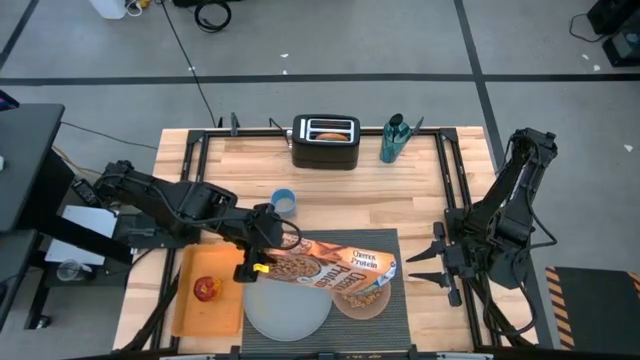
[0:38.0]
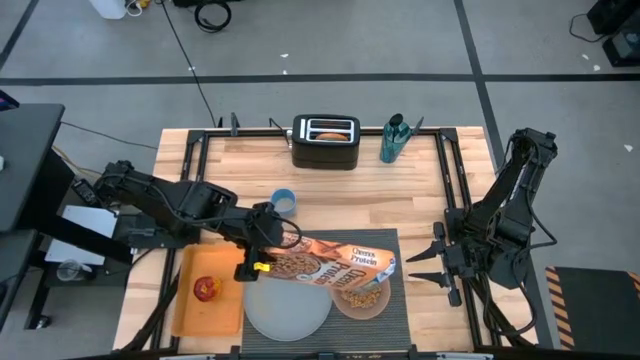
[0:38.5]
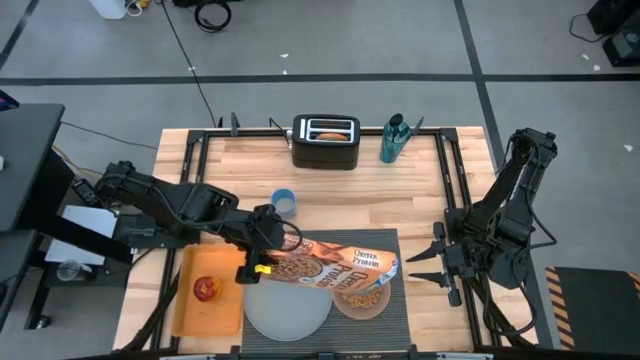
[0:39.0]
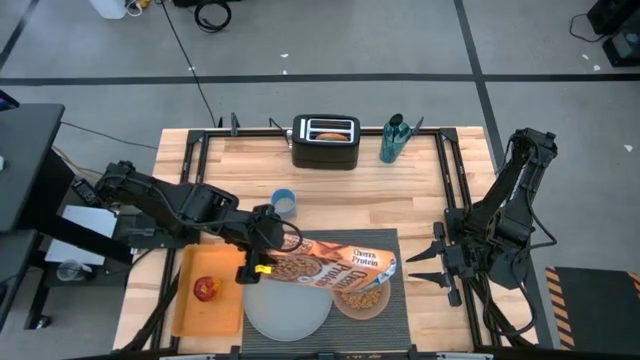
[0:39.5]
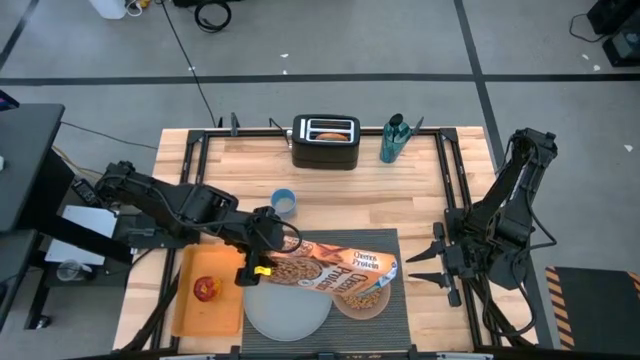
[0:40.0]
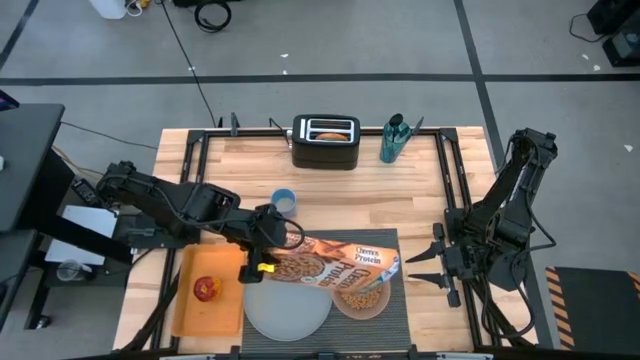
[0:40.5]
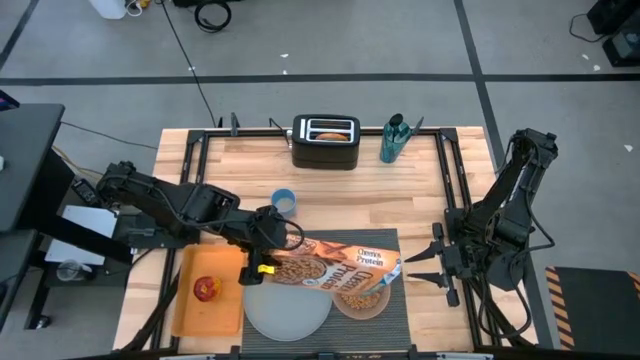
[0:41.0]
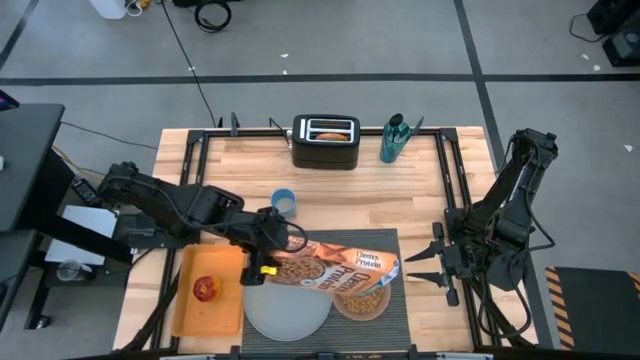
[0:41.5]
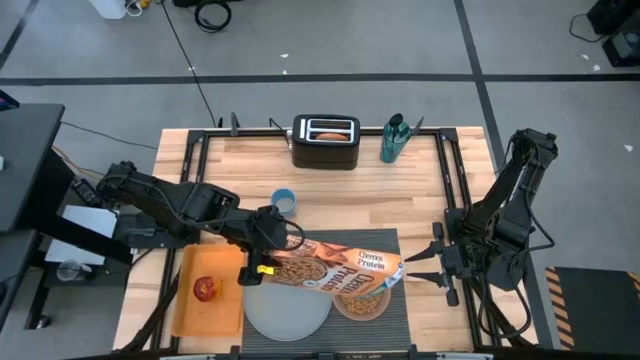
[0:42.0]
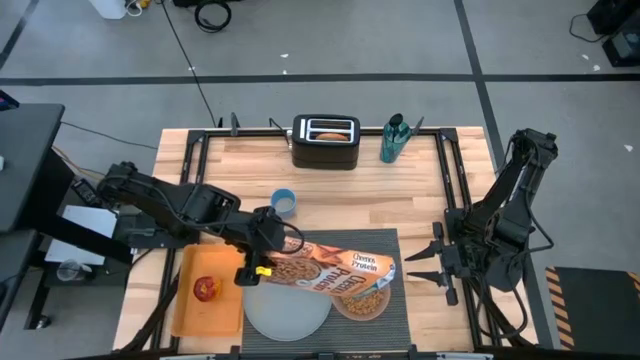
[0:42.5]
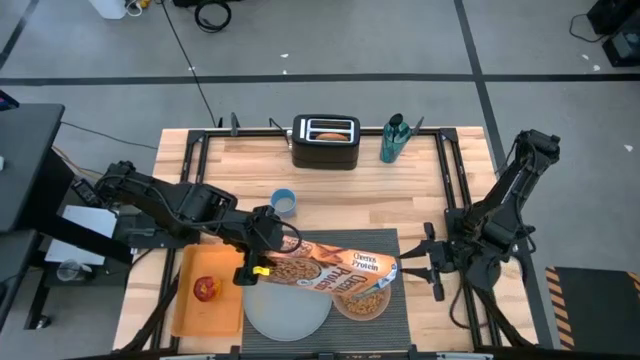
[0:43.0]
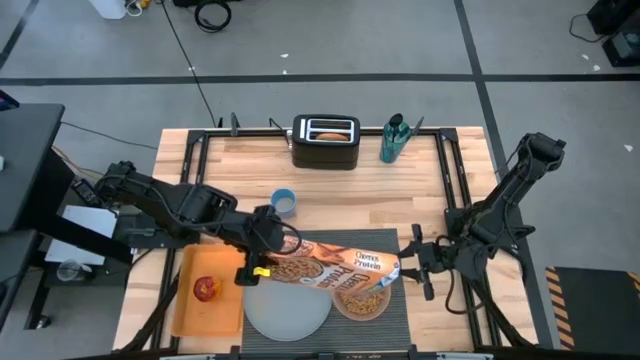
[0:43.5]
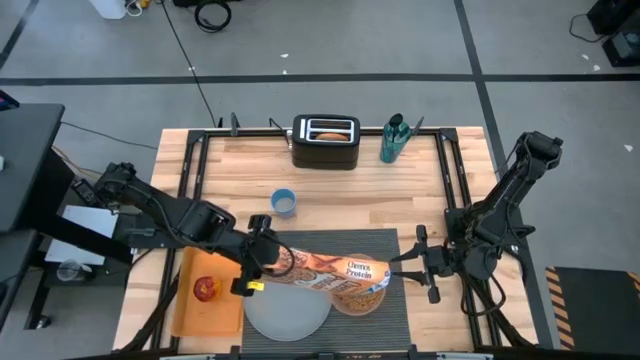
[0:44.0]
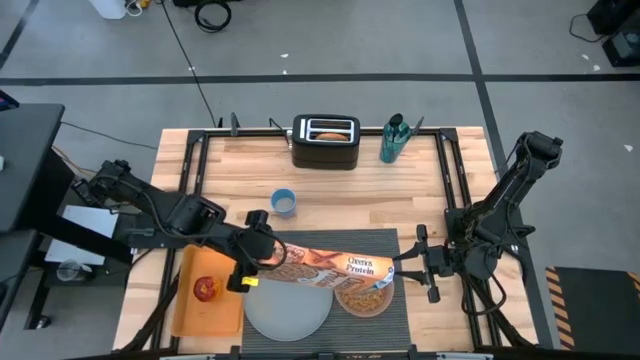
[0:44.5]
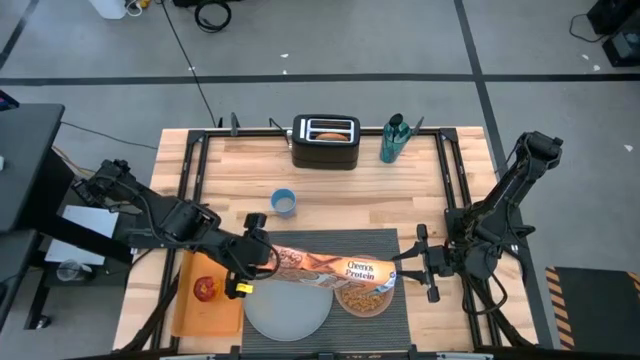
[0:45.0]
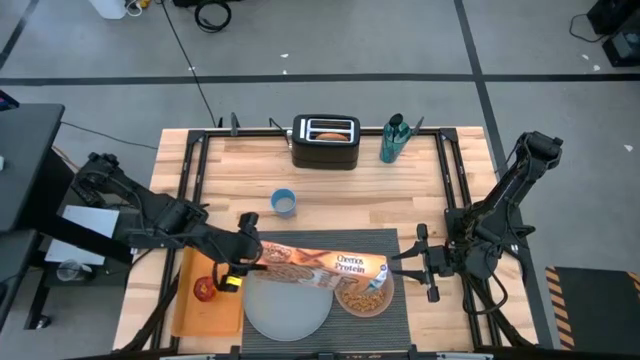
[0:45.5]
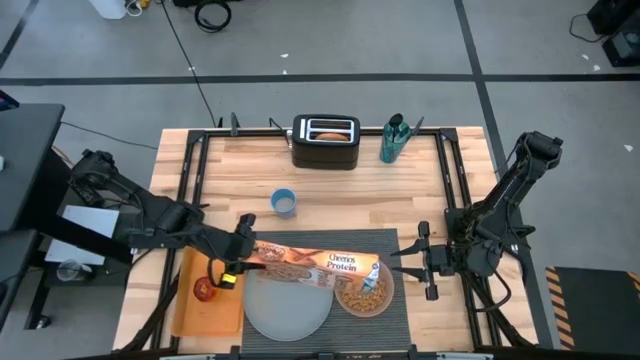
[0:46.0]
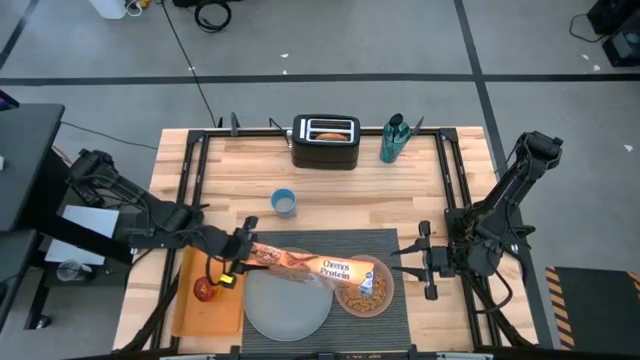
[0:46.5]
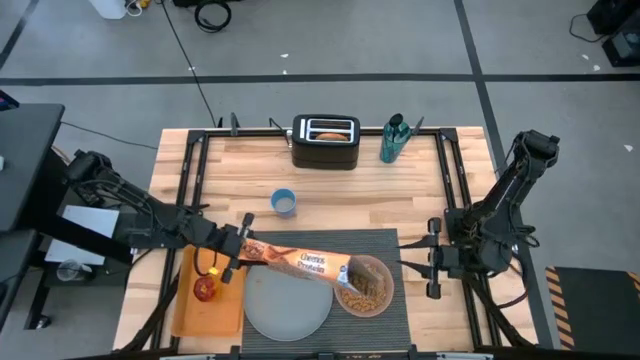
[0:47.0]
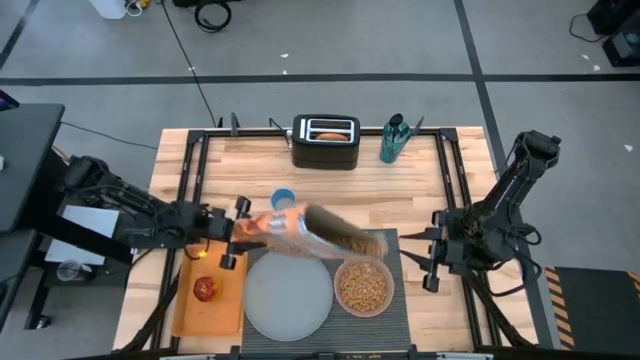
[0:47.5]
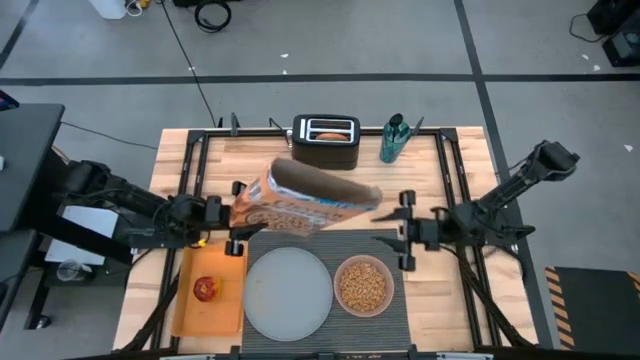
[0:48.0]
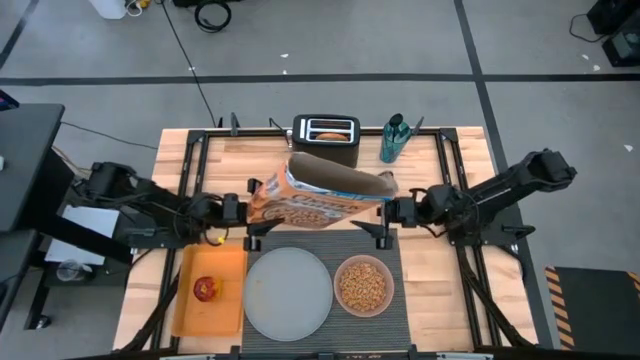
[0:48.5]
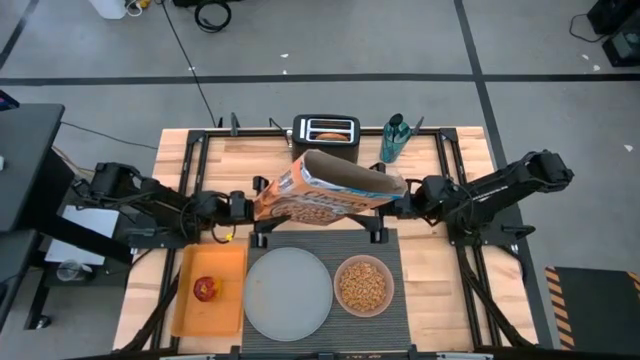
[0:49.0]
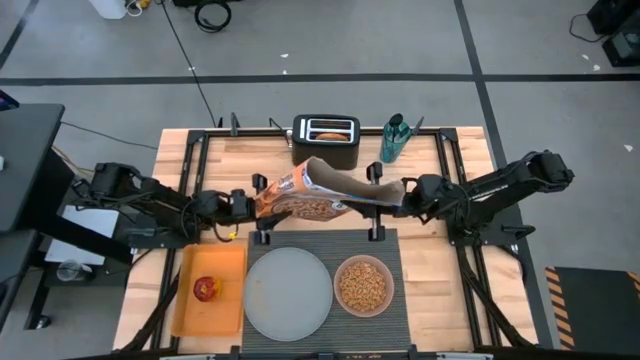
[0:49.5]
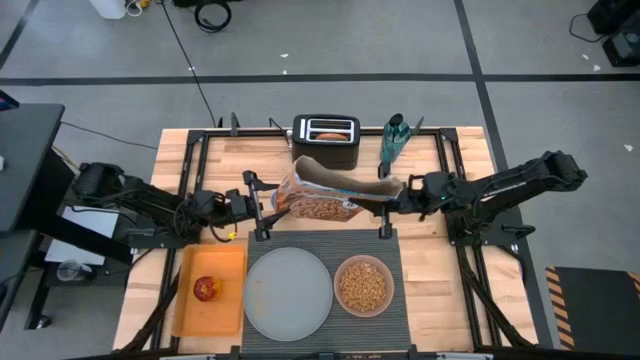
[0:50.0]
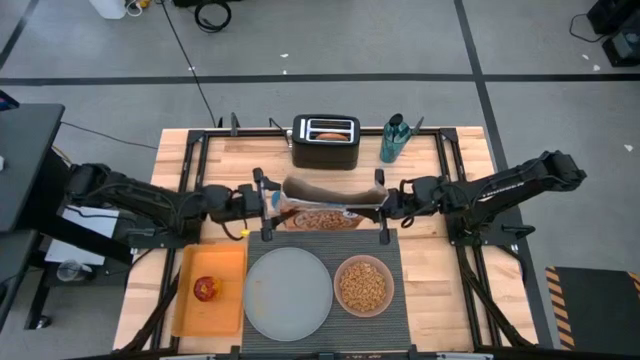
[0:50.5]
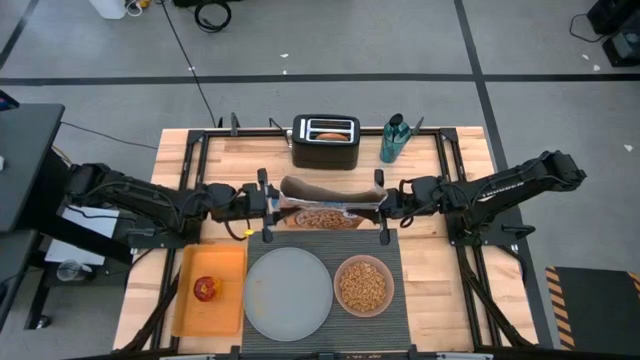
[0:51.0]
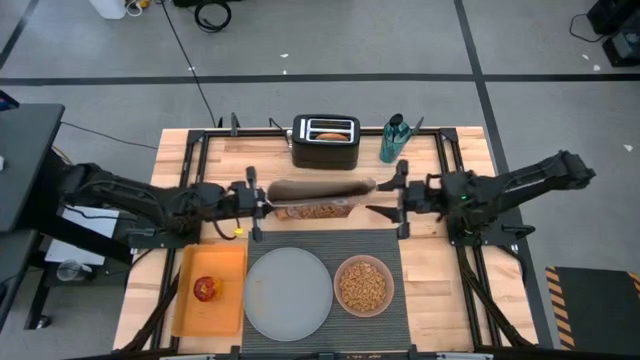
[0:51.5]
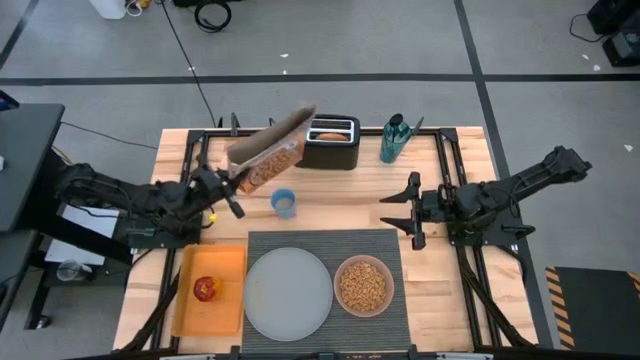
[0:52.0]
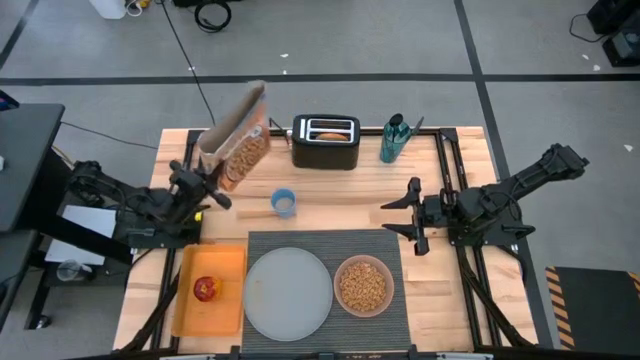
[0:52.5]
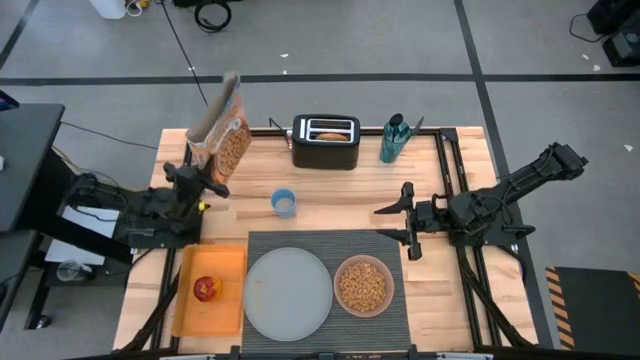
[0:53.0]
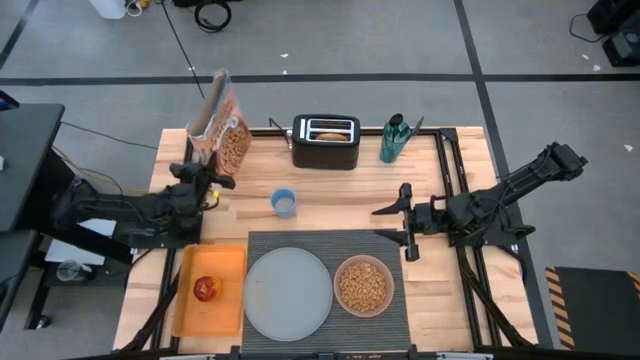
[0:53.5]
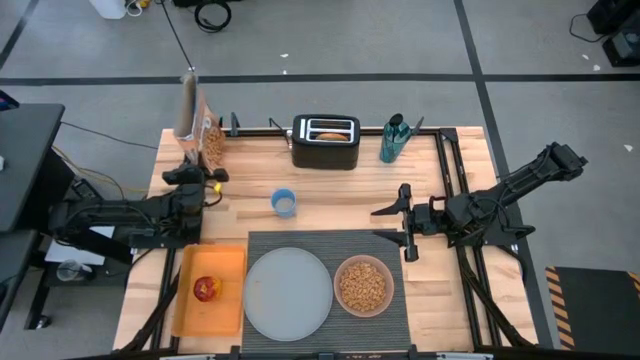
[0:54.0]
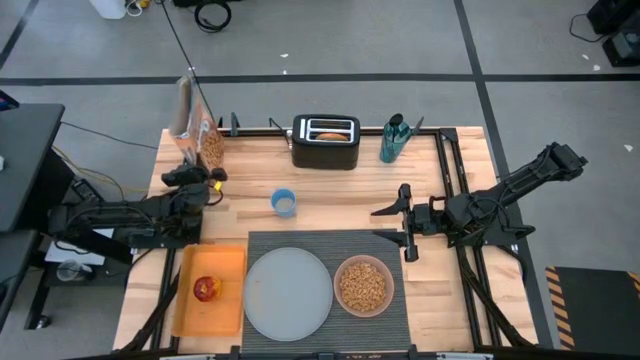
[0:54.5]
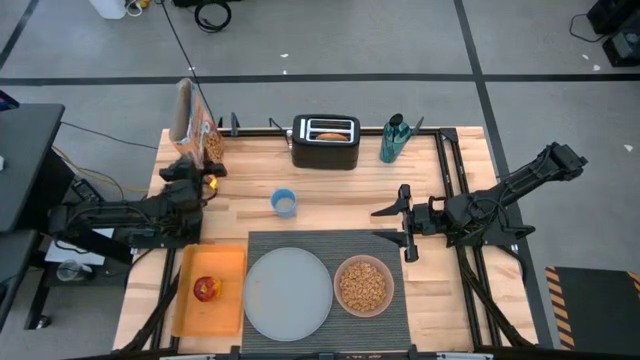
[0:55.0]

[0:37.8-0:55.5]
Task: Arrange a breakfast setting
Pour the cereal from the cereal box into the light orange bowl

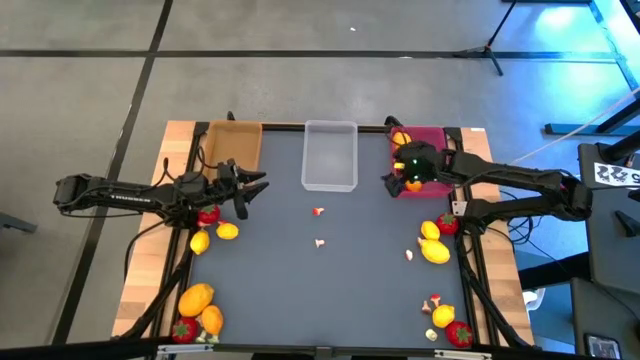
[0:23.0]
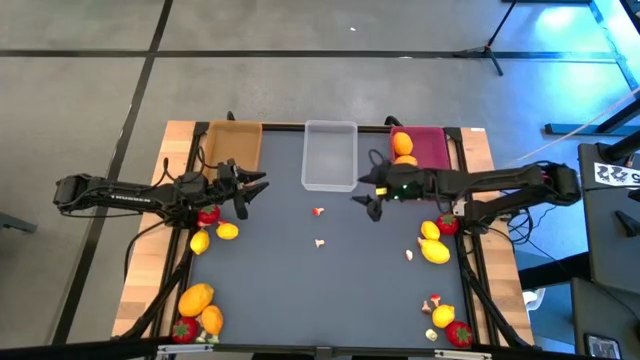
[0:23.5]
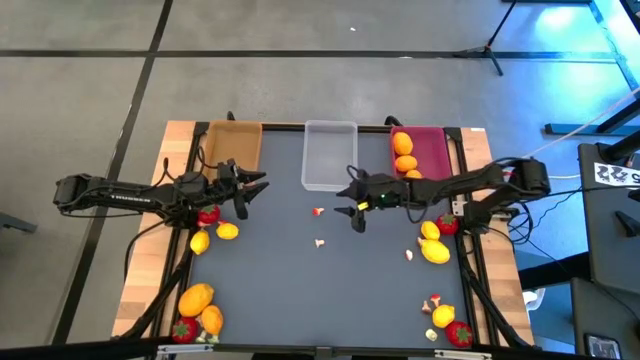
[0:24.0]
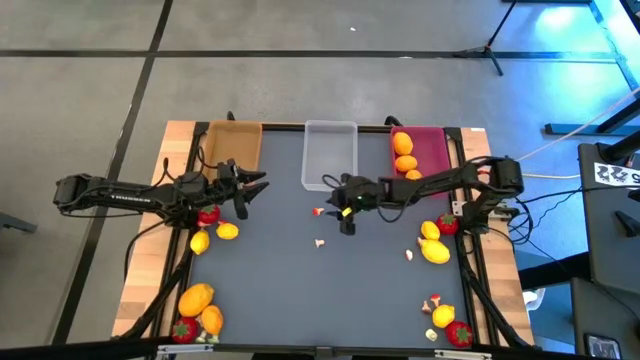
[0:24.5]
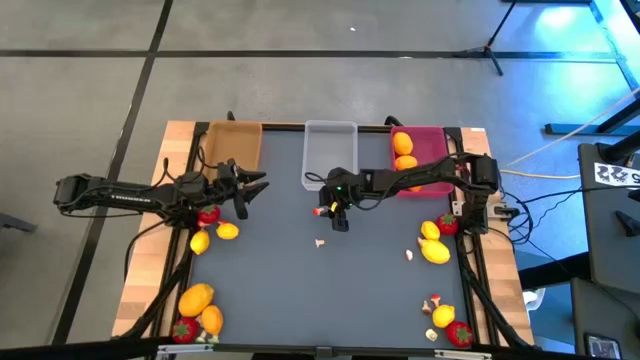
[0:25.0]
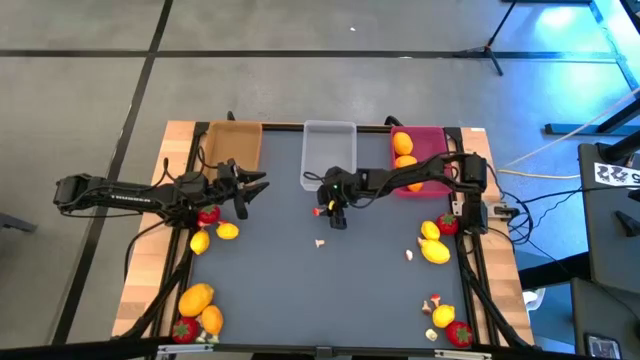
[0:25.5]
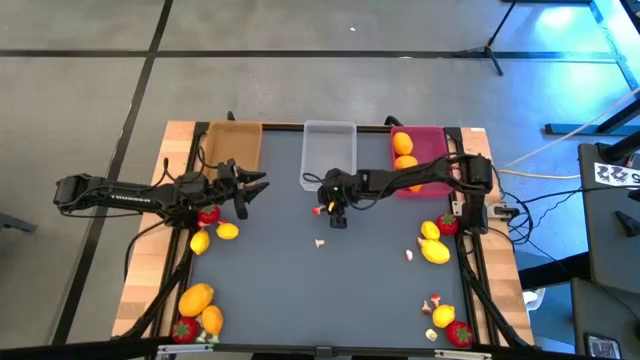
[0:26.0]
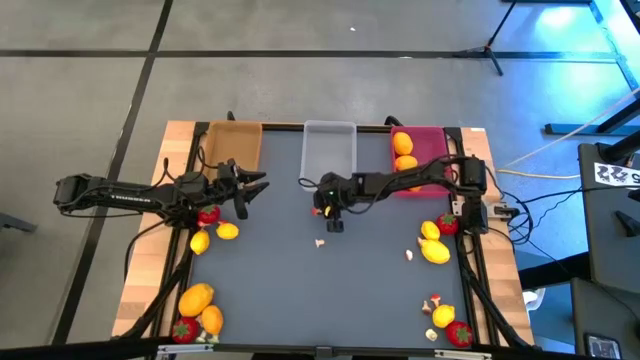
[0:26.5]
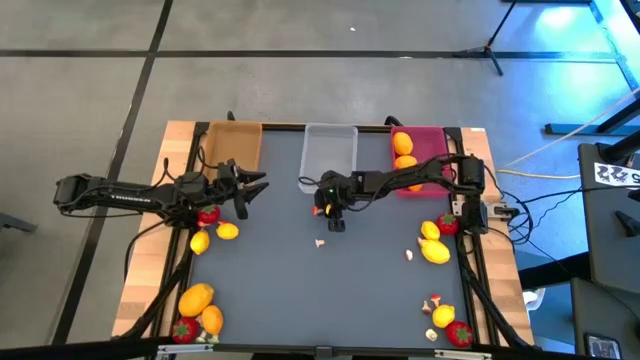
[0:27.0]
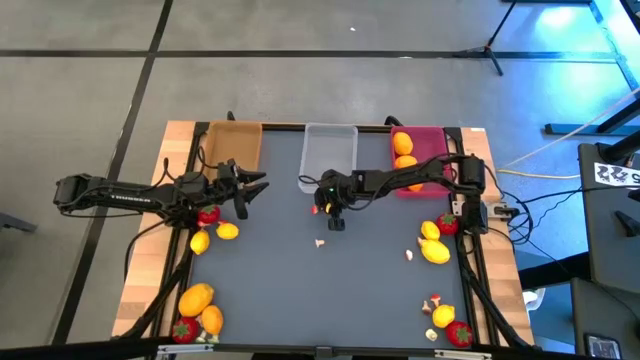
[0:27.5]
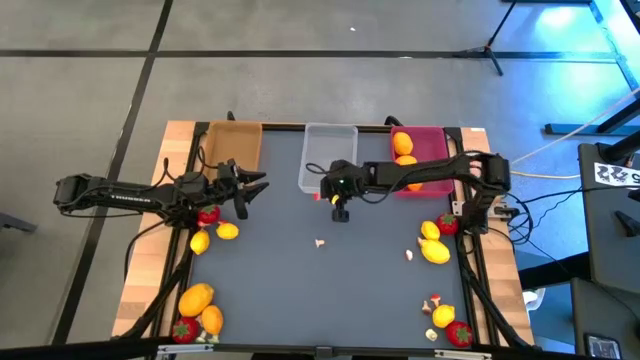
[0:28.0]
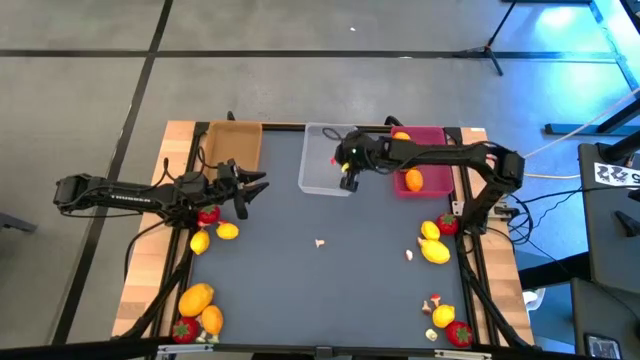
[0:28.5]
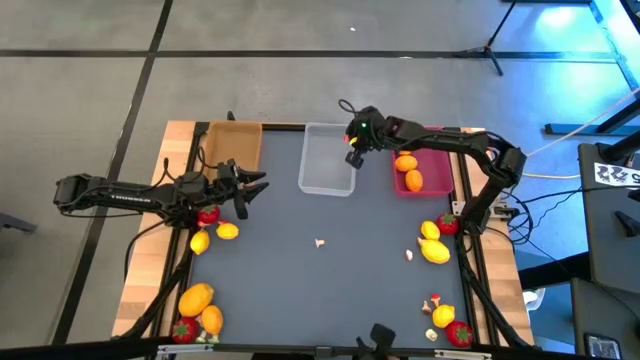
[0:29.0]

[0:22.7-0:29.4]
Task: Sort produce into baskets
Put the mushroom into the transparent bin
